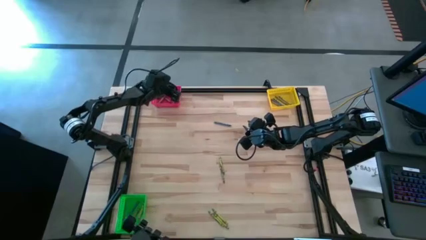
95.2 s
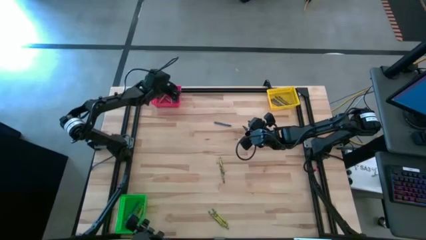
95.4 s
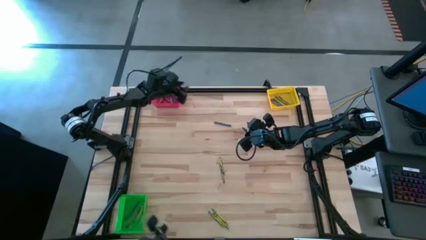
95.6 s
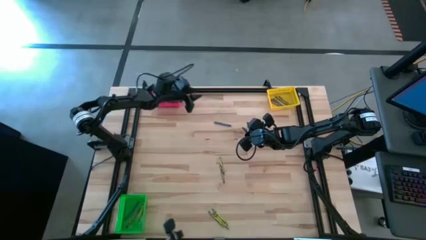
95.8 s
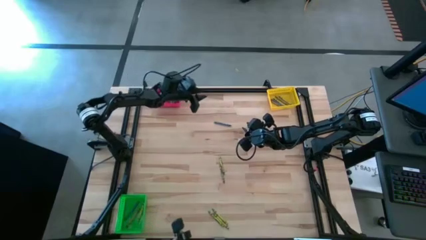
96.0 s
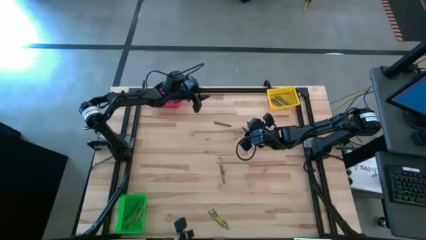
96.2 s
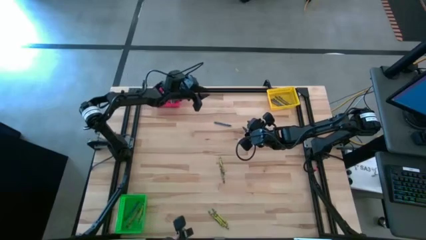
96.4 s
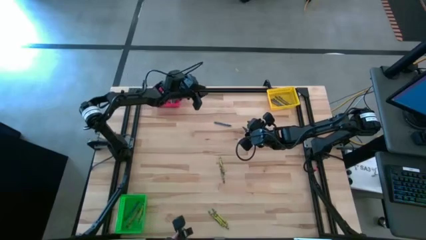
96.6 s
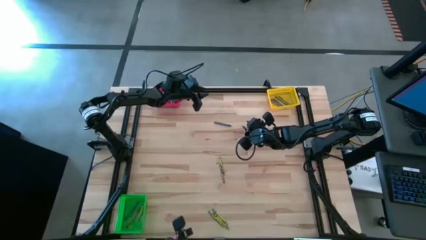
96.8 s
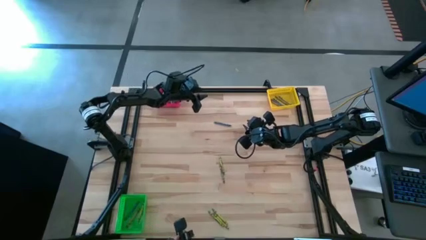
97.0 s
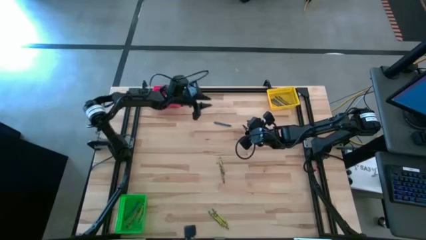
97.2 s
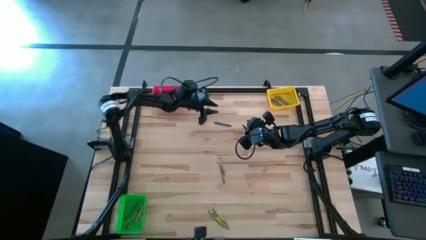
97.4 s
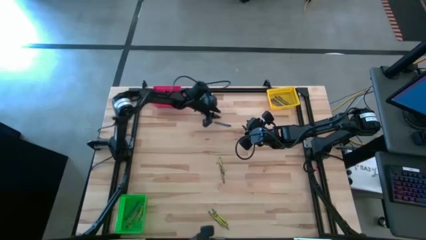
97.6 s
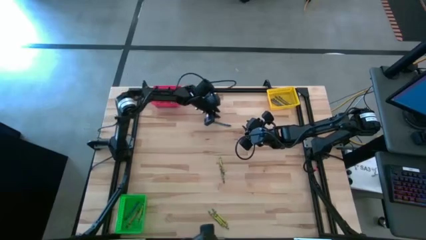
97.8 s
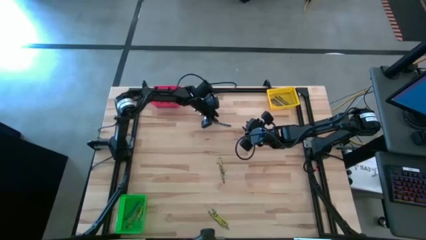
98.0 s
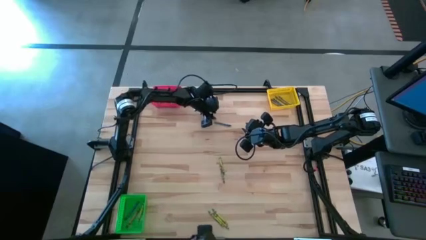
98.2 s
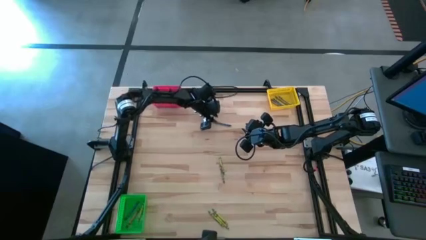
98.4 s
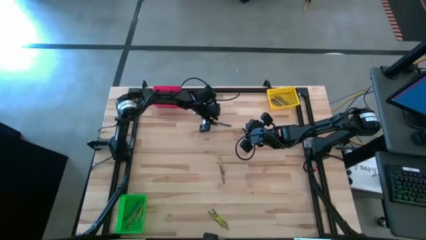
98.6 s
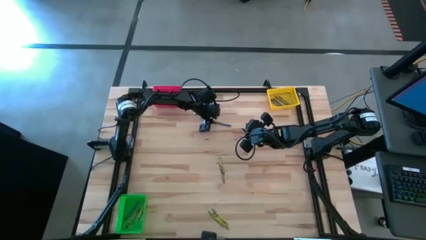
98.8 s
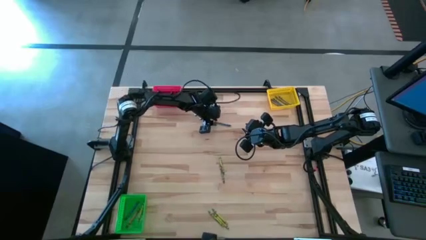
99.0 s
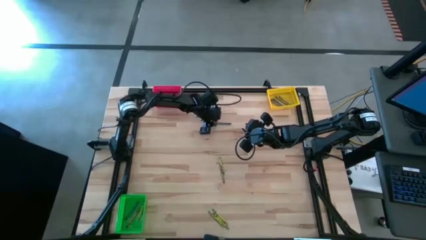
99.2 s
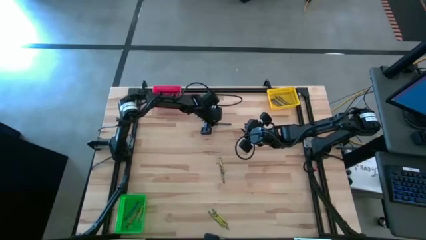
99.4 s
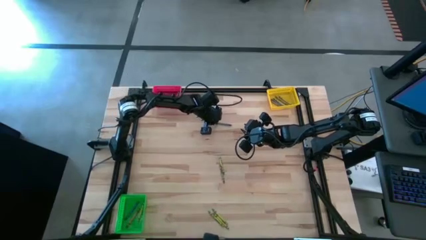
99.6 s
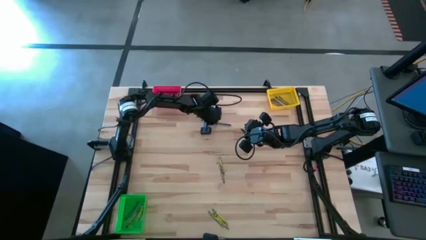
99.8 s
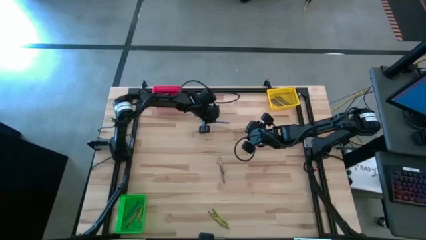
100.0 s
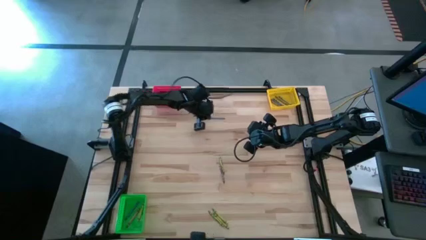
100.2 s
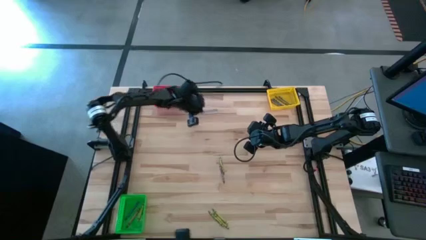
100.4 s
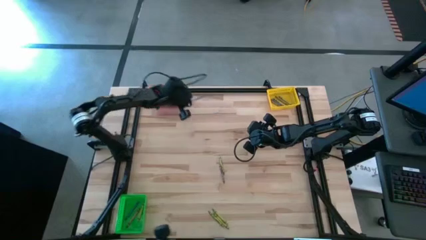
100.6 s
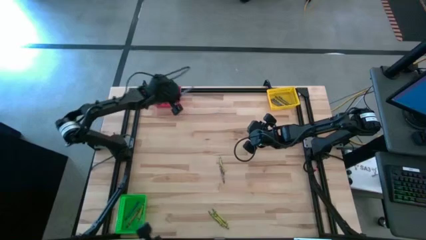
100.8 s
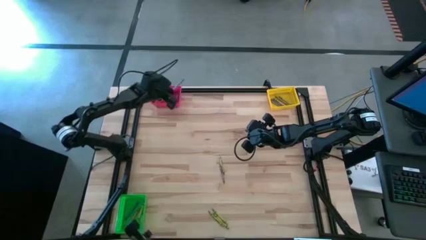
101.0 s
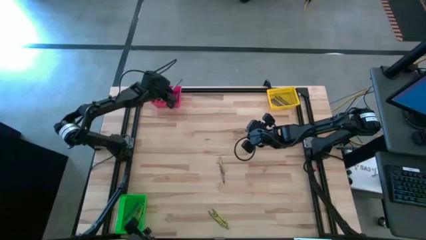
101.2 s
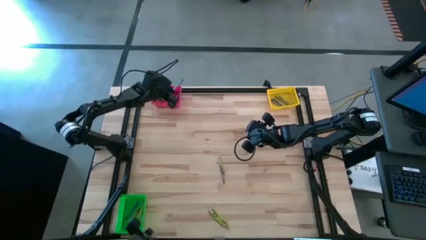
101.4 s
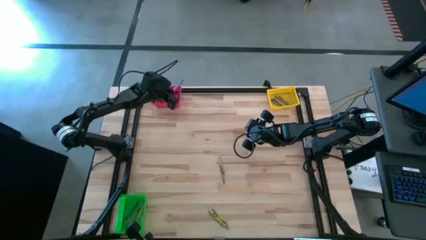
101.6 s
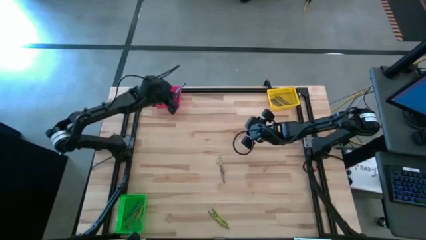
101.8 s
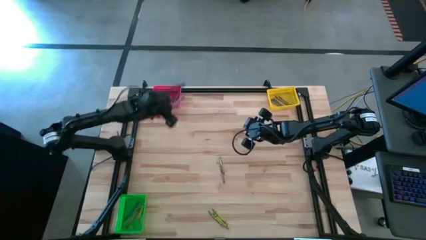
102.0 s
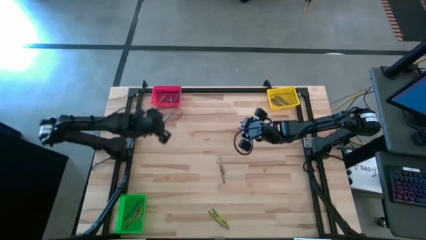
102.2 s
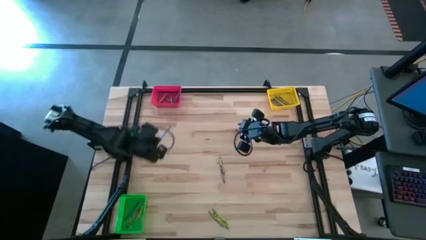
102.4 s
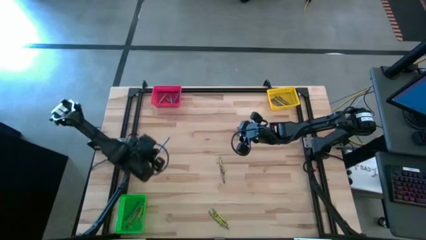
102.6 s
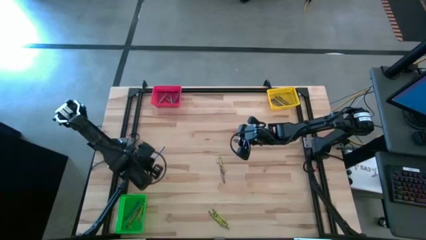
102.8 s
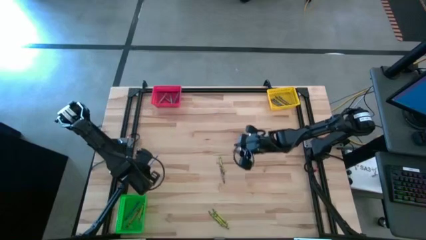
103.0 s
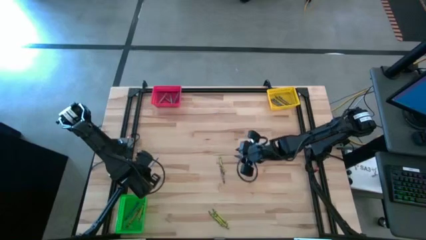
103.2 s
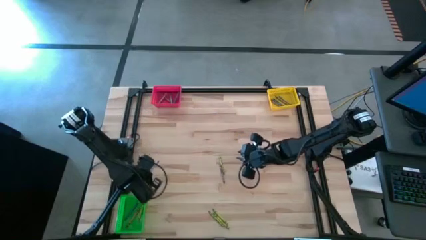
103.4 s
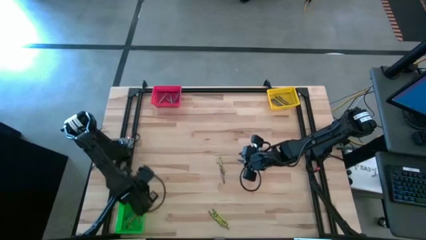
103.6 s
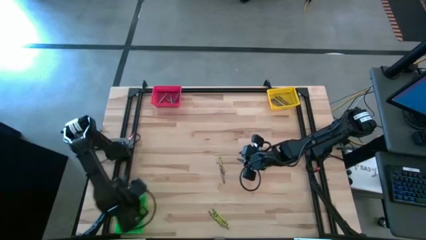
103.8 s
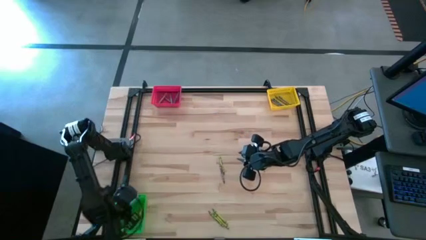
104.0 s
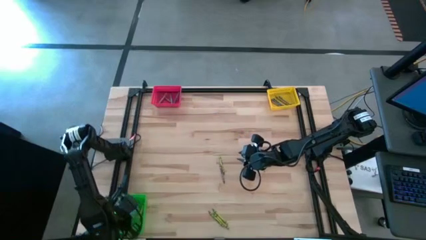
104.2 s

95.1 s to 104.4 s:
Task: Sort crayons
Put the blue crayon into the green bin

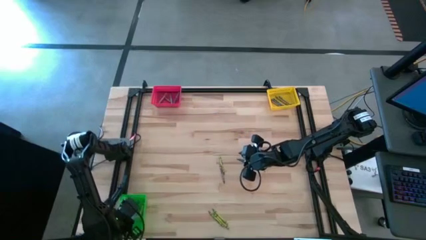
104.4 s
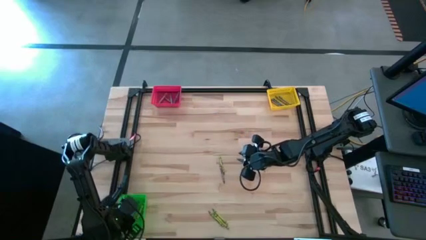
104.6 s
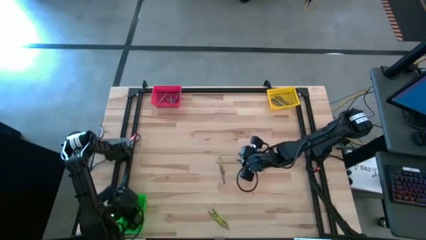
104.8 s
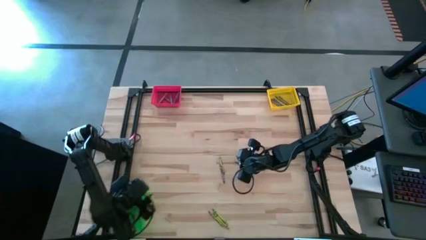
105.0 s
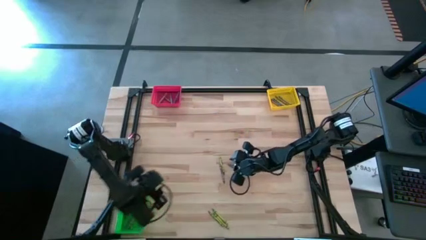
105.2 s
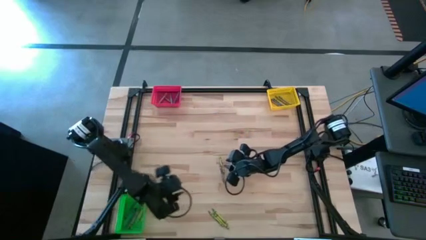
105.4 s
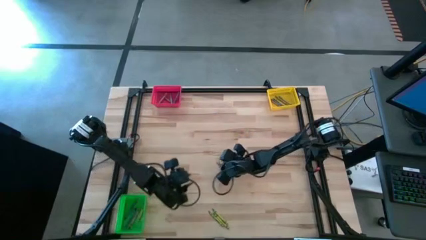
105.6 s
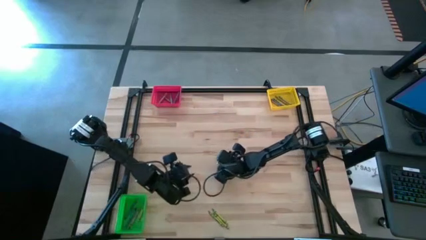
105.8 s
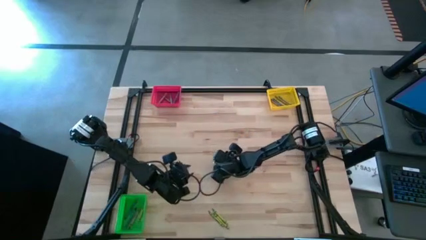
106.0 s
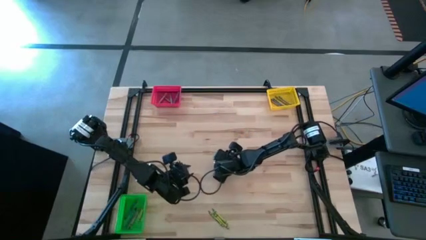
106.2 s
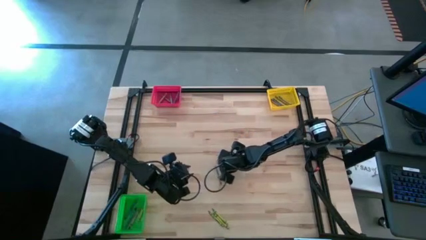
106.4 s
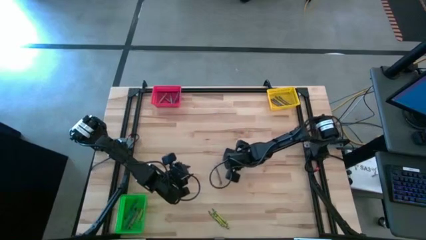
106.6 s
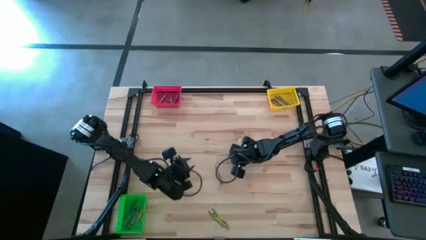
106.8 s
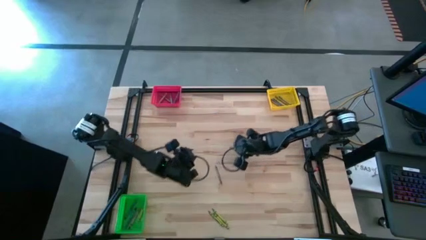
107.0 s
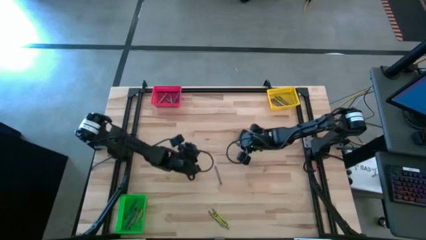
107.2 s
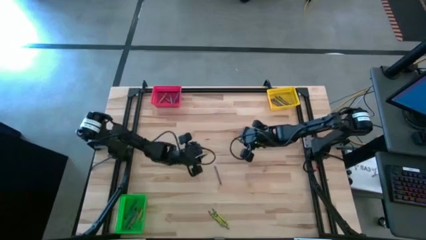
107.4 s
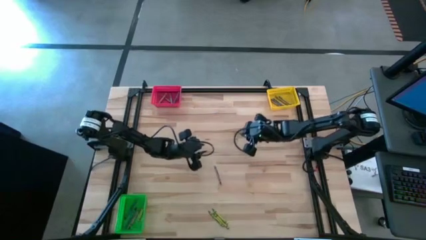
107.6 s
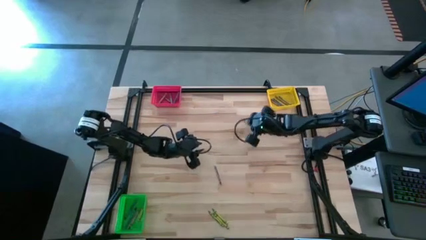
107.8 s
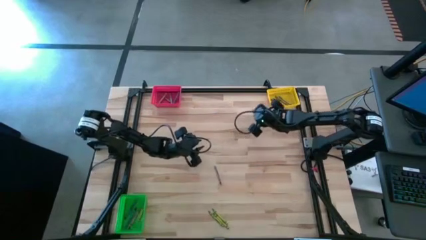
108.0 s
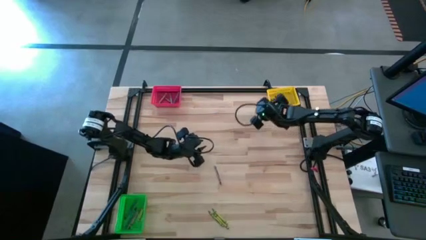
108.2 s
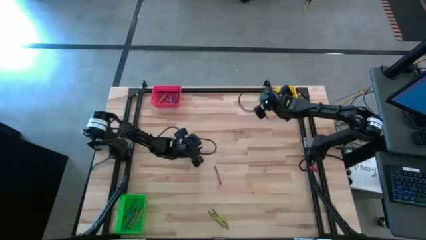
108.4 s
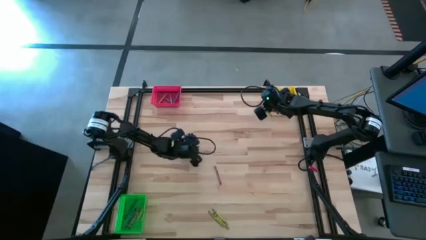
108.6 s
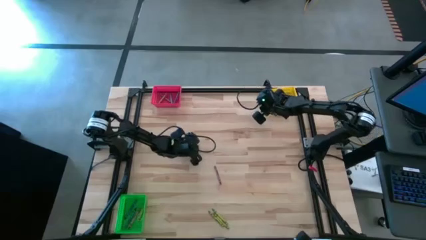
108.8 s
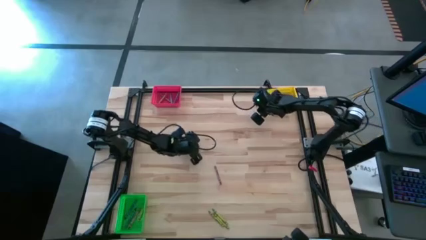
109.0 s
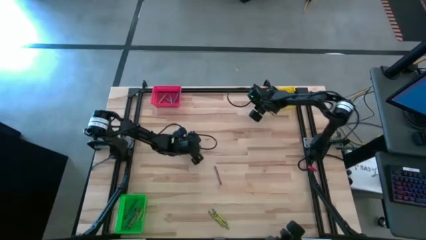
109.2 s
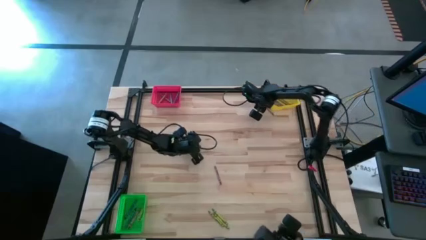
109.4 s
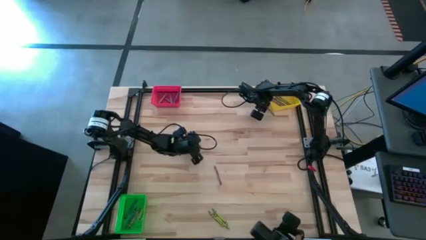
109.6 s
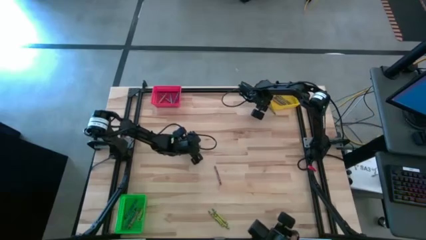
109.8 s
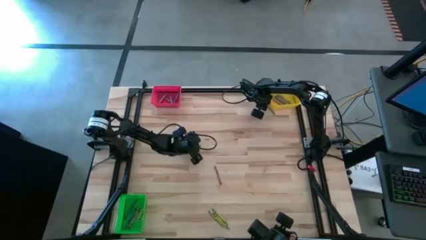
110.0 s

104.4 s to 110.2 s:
Put the green crayon into the green bin

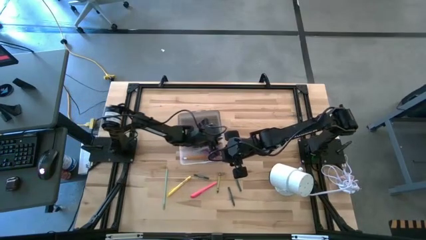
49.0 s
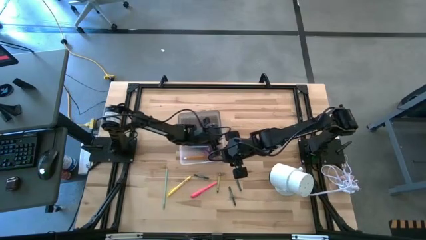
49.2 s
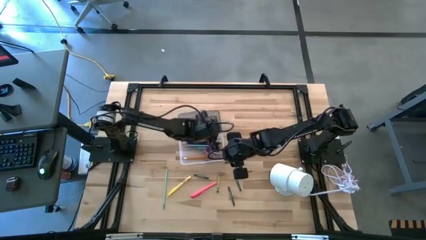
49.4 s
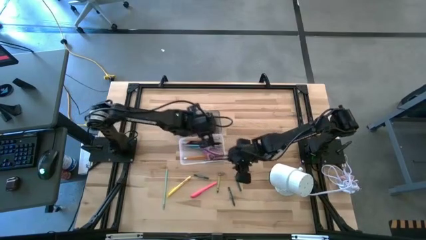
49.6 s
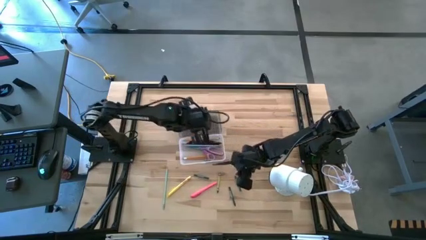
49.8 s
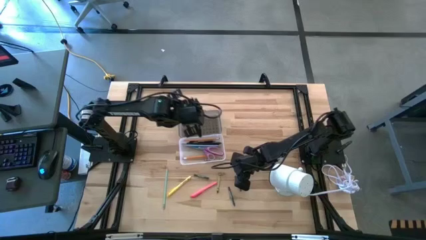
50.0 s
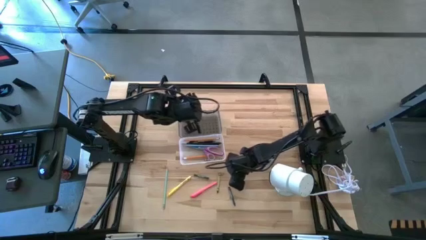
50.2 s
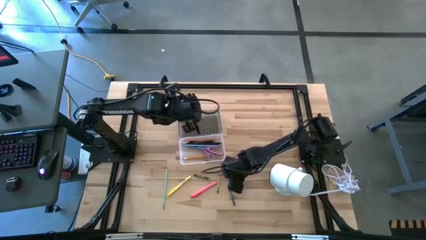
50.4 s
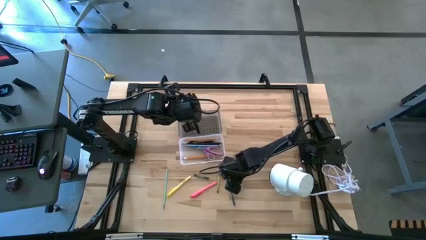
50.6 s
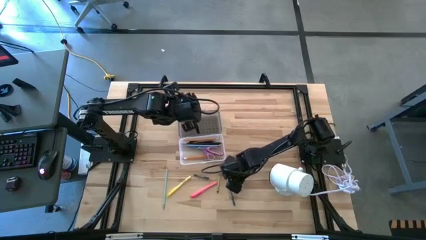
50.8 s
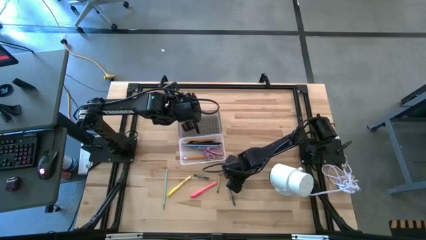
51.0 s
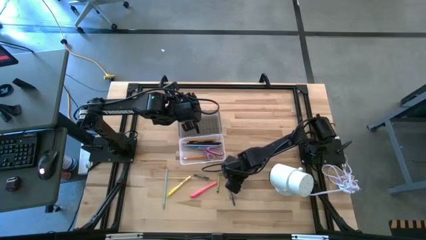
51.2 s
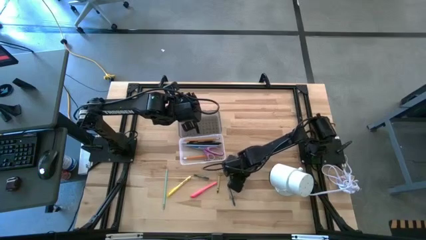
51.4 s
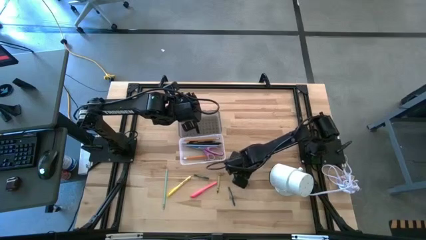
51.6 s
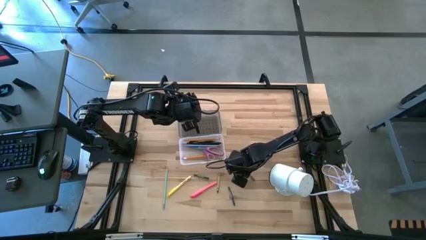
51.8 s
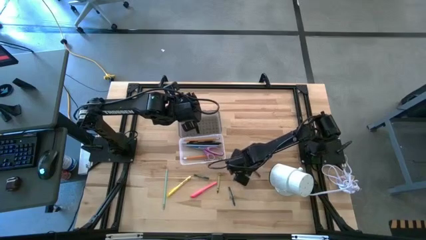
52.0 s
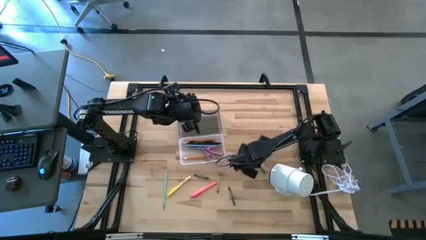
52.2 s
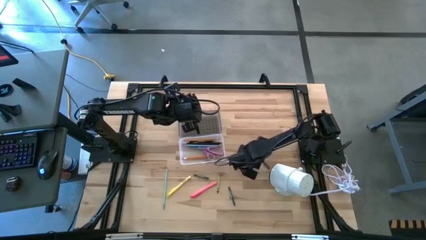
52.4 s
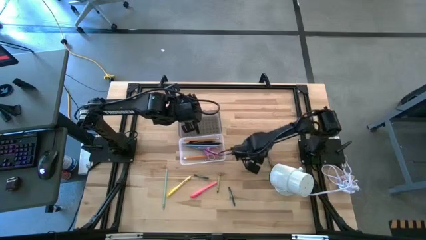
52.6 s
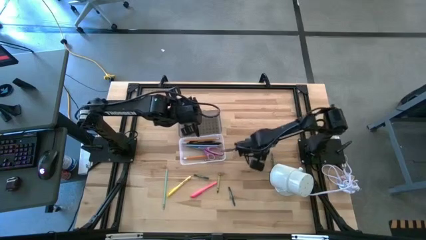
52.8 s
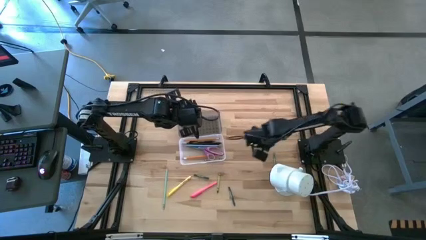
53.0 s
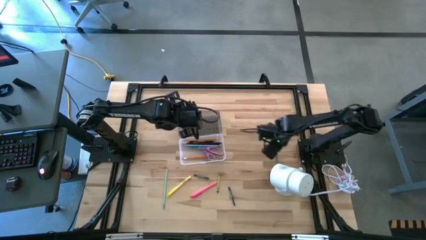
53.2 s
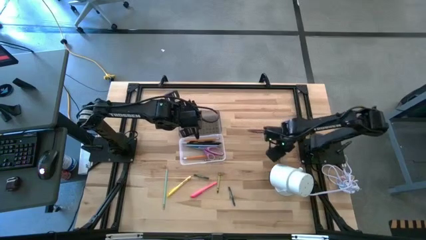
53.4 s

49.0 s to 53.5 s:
Task: Pick & place school supplies into a supply box
Put the dark green crayon into the gray supply box
